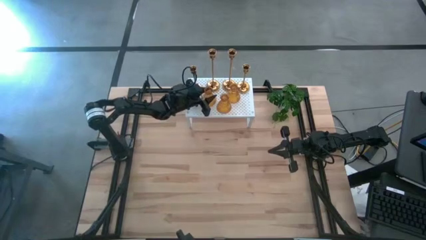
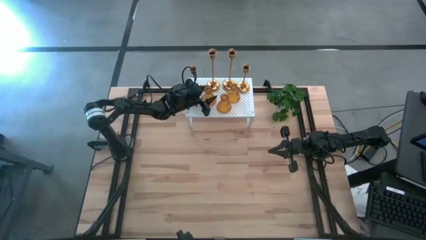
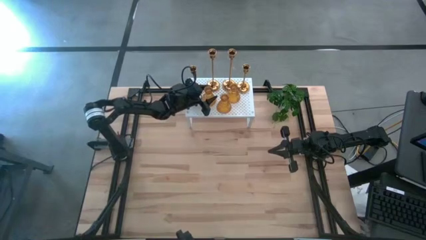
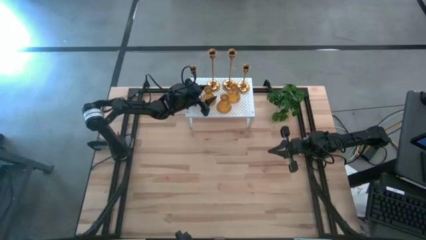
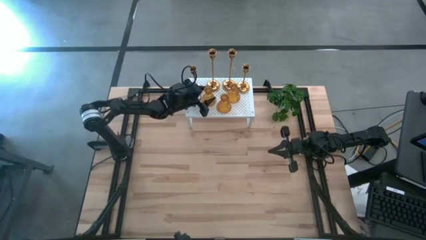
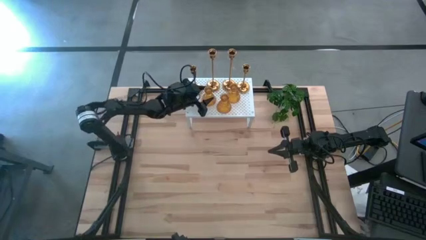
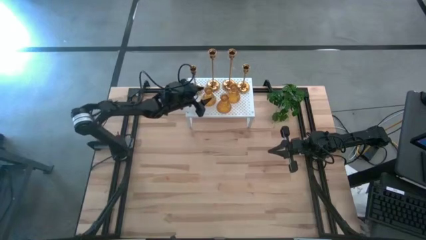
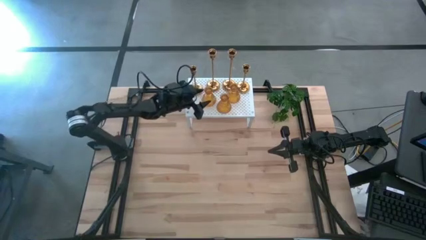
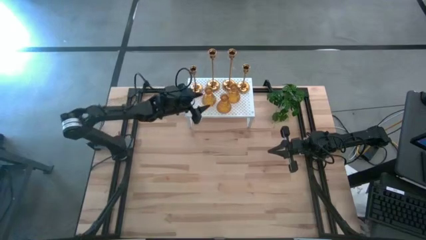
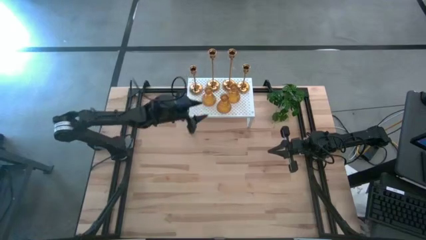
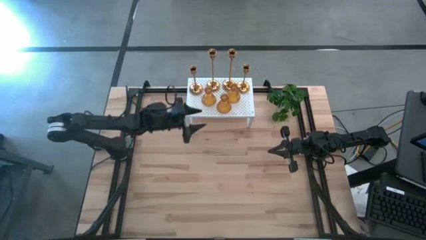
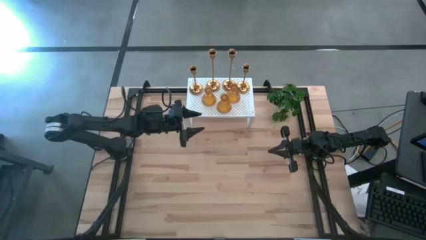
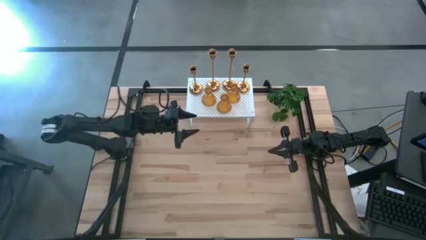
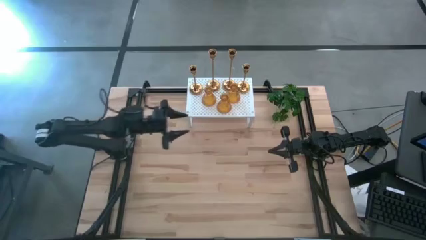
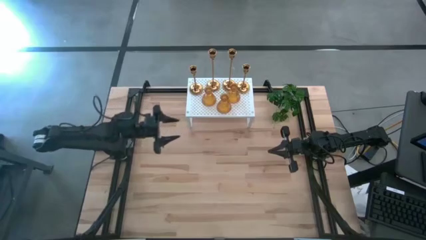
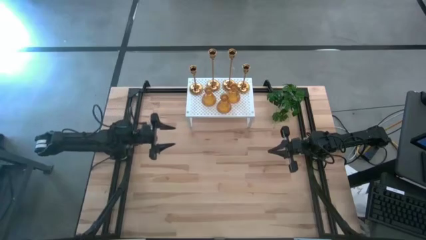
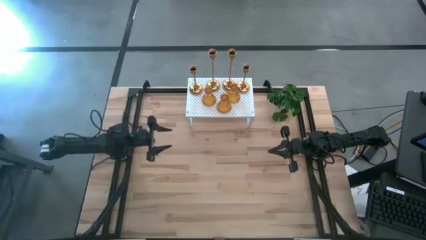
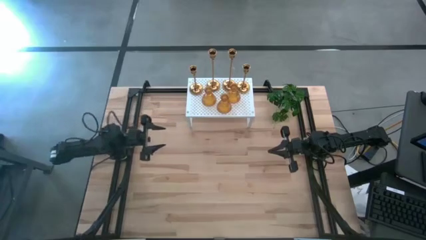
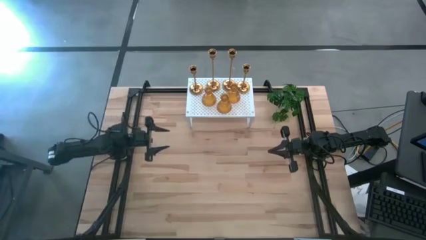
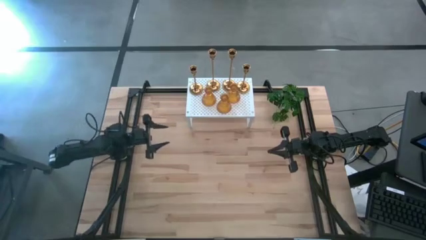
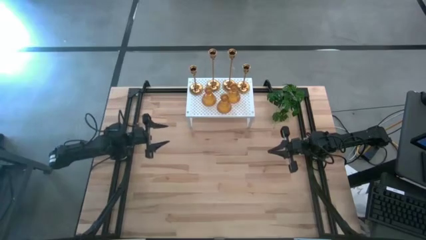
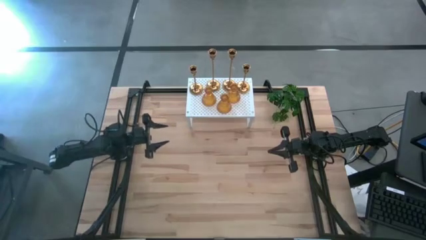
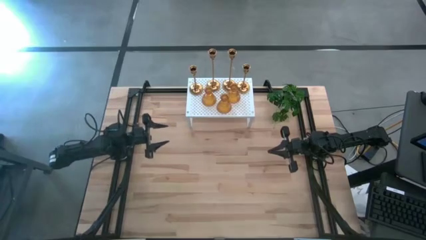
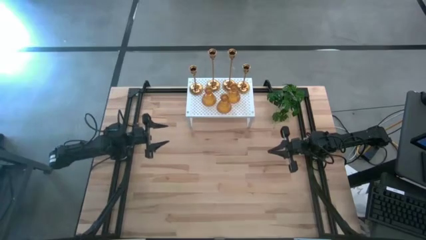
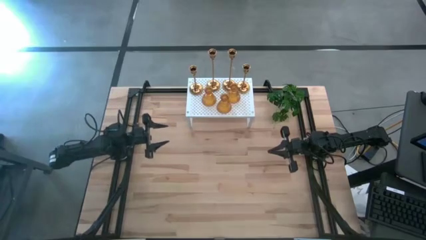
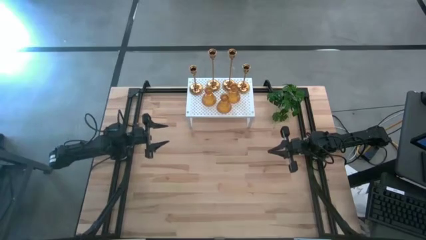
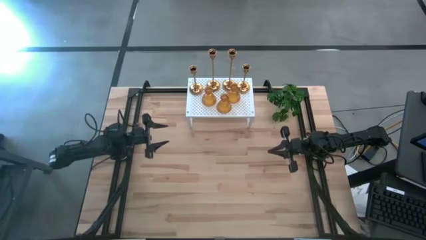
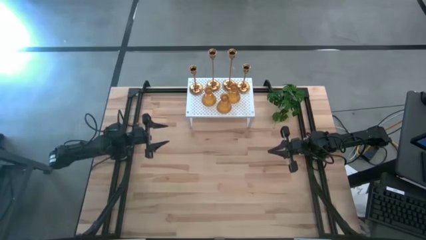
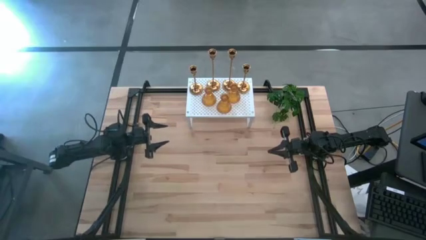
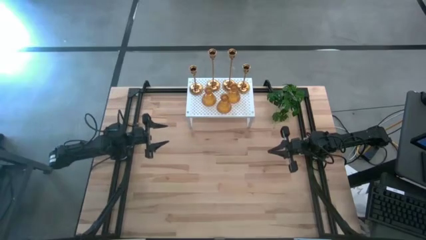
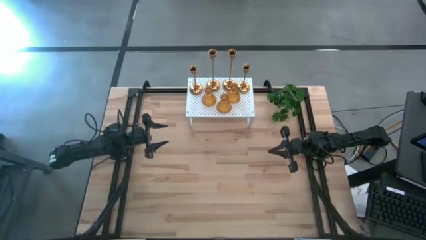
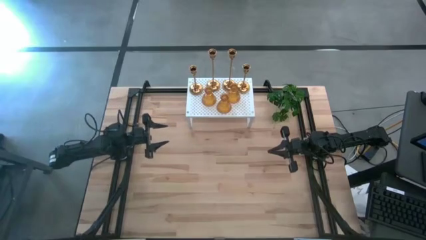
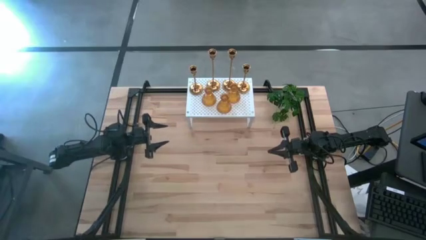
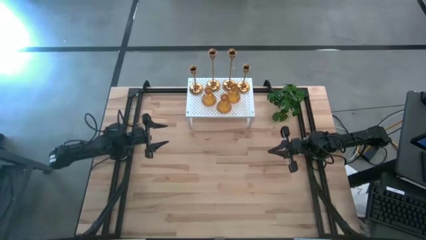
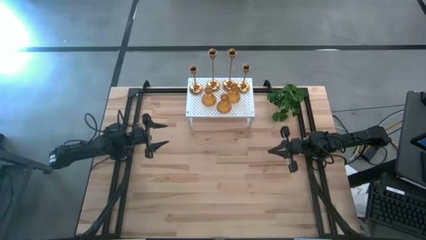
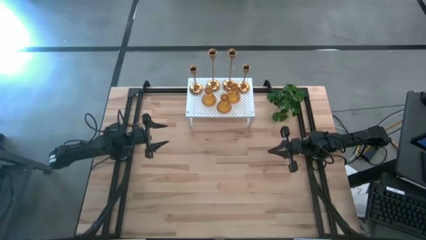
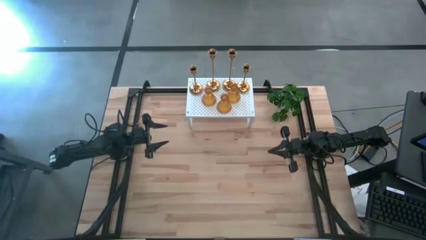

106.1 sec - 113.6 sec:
Task: Pick & Place candle stick holders
Return to Home Position
